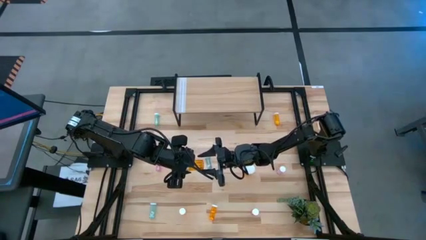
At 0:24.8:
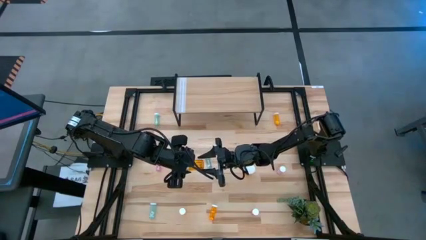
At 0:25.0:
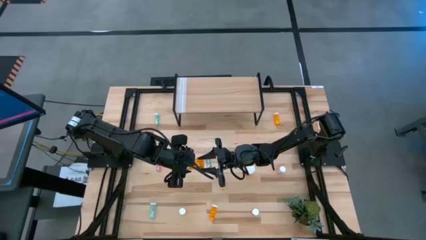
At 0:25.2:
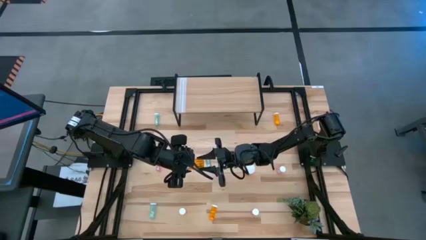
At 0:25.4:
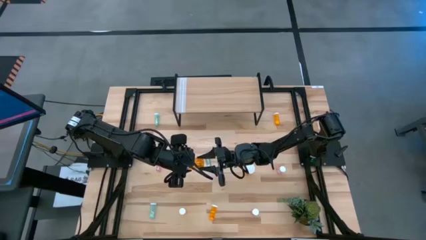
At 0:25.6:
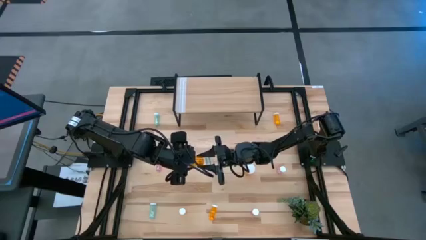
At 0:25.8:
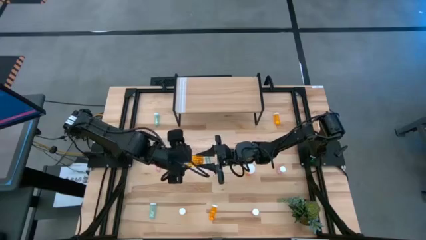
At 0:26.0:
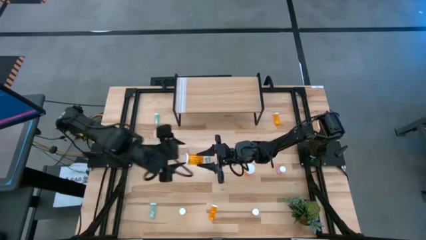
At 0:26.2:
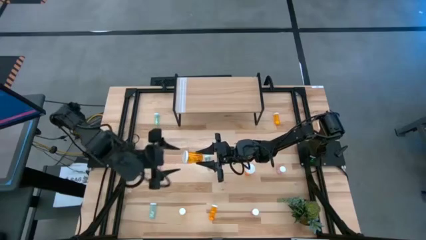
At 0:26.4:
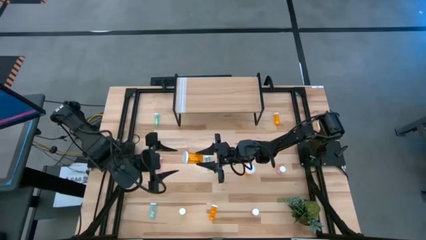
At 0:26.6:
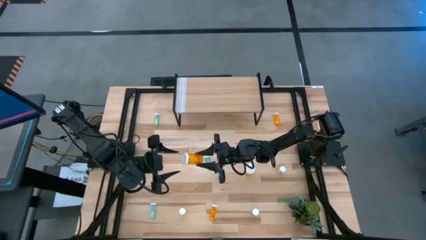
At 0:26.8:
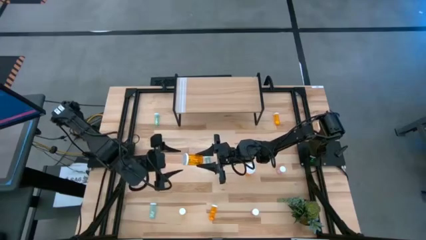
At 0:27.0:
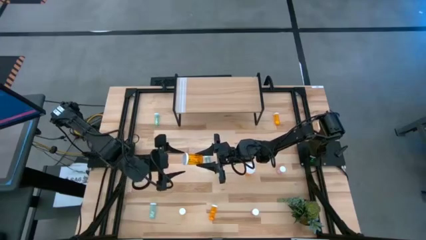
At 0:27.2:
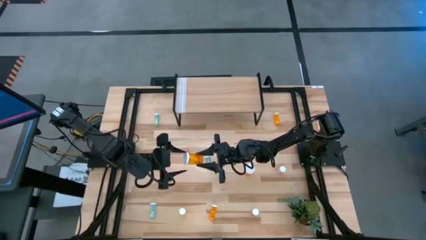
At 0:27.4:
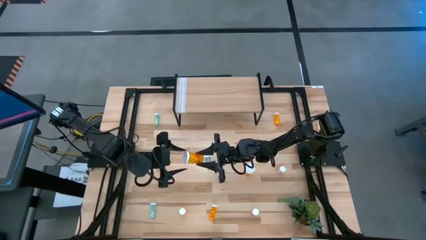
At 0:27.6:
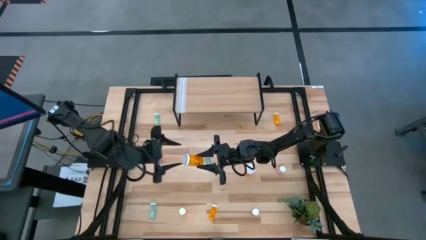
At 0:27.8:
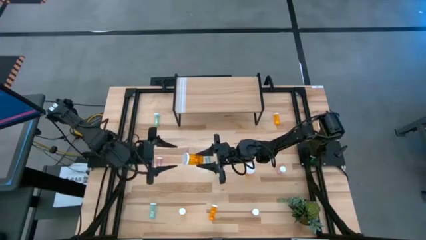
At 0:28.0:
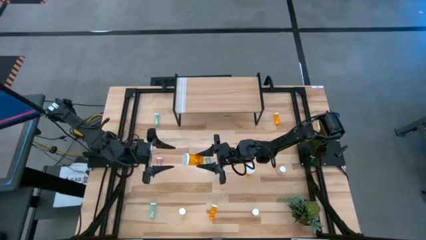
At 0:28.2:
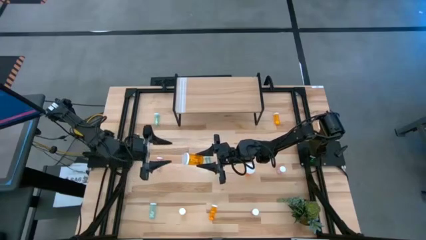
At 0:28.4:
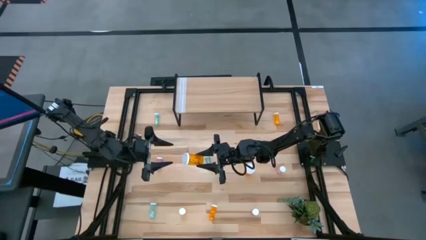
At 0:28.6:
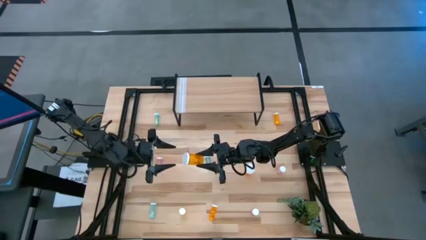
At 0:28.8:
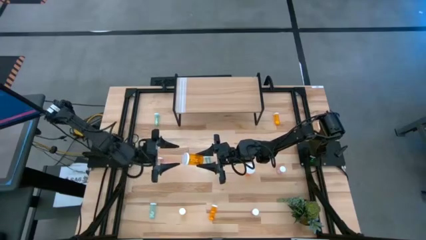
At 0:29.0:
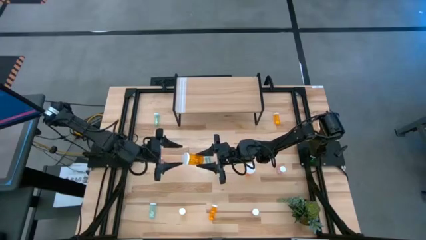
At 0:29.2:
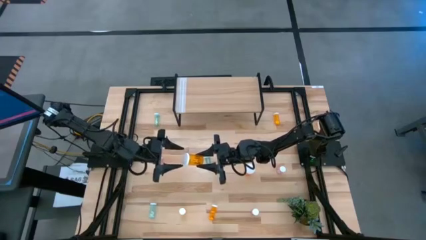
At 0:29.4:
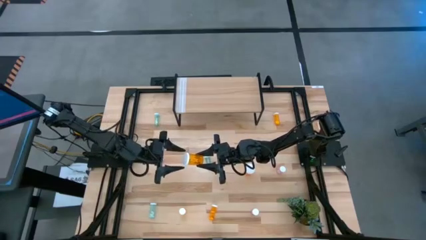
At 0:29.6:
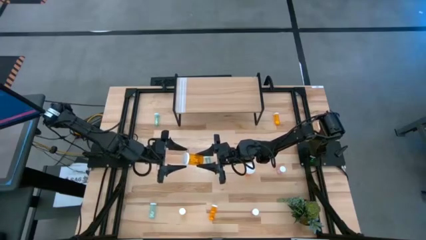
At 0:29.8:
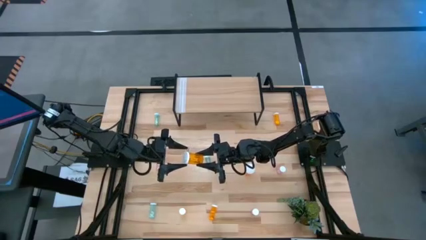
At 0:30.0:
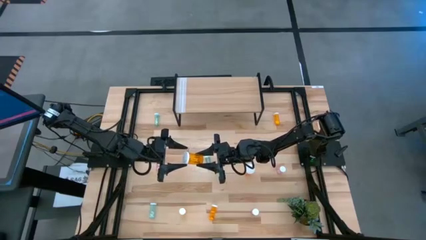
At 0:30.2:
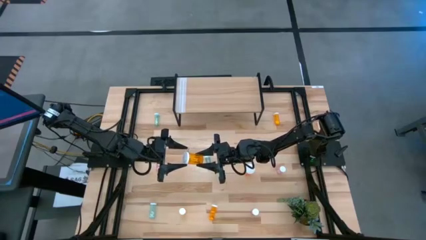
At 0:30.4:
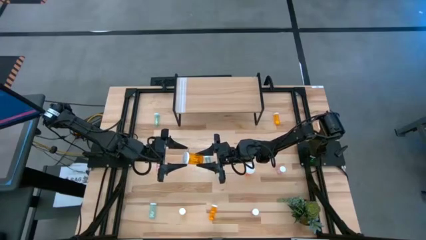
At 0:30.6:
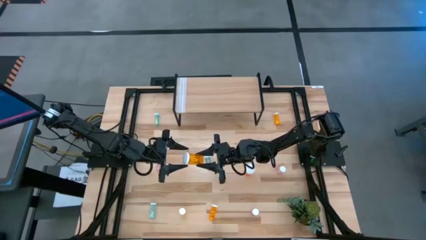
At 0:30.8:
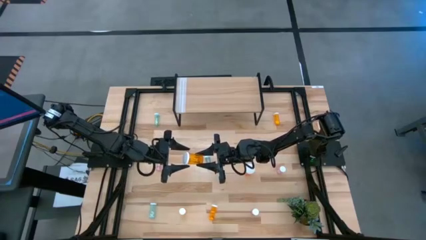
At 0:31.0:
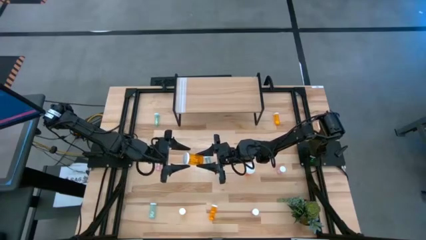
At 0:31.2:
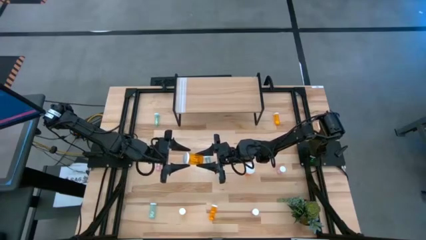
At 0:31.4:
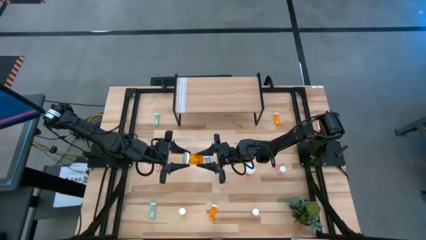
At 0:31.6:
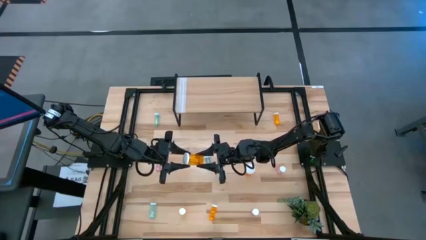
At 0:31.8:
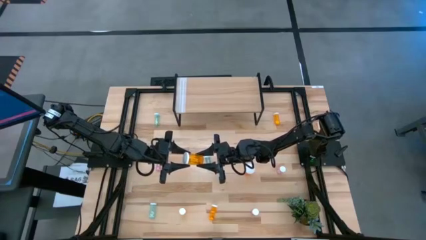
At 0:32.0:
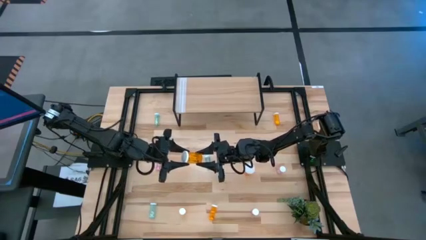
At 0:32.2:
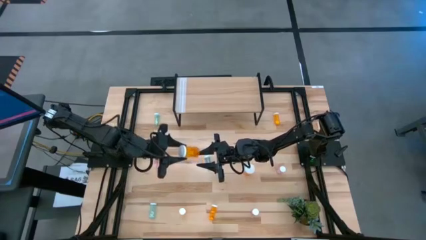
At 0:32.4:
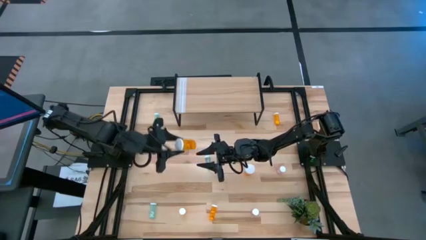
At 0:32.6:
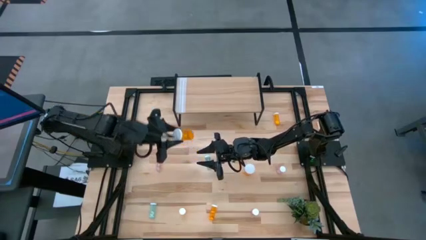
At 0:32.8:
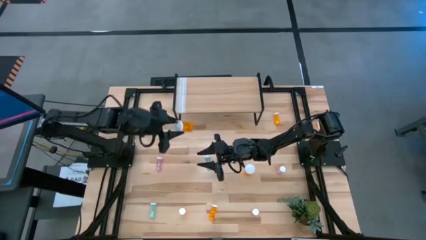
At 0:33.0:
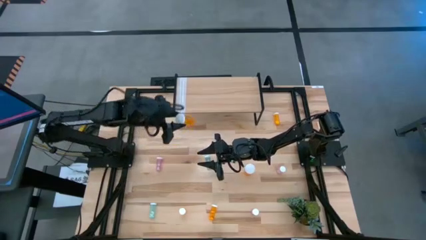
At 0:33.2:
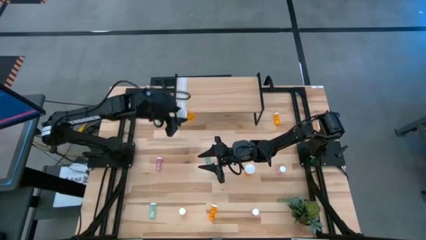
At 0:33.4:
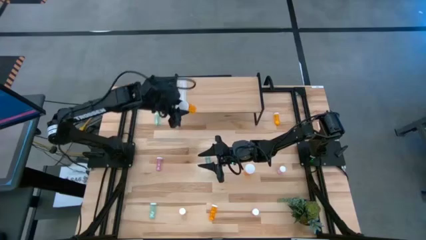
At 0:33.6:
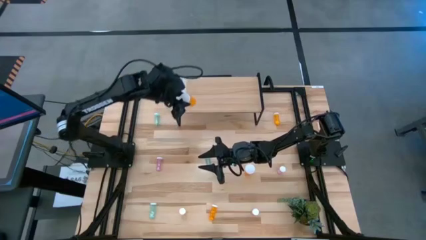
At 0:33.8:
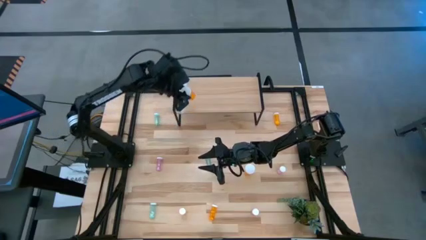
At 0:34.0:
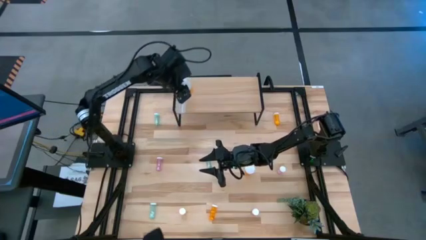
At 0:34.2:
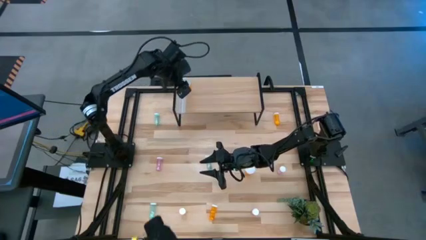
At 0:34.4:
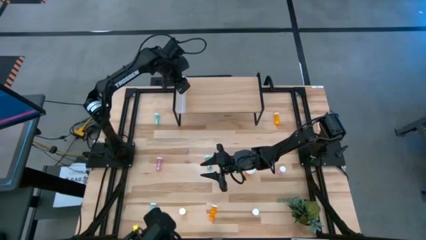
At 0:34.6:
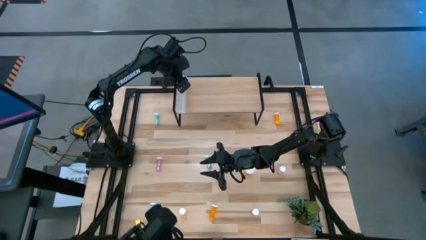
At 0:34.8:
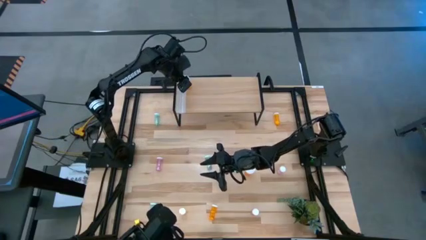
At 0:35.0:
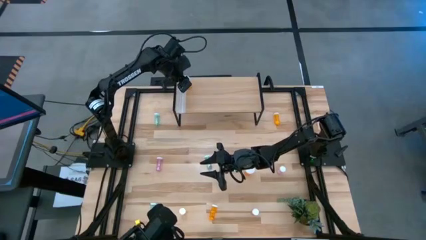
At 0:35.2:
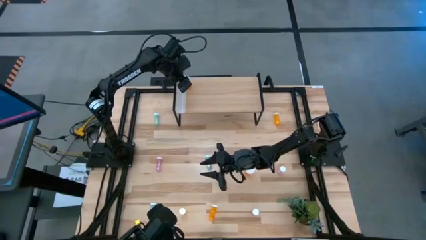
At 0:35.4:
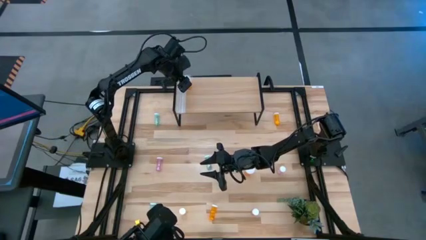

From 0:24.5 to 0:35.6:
Task: Pick and place medicine bottles onto shelf by color
Put the left large orange pill bottle on the shelf
